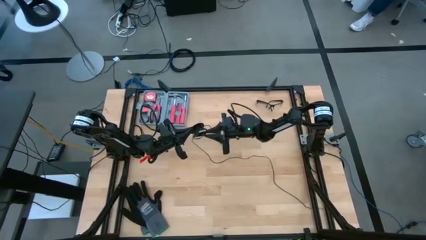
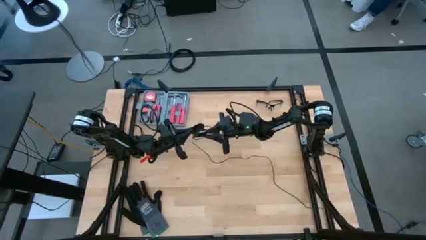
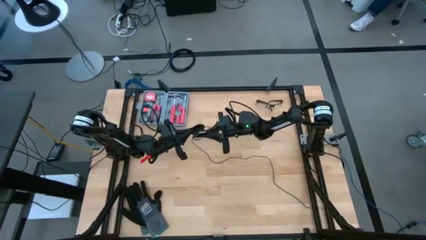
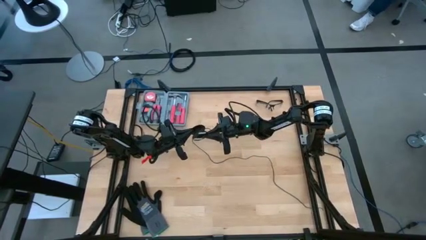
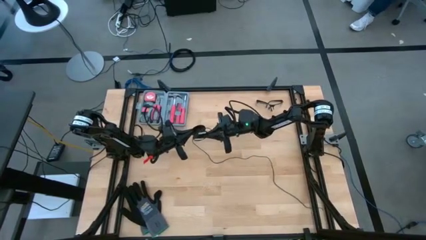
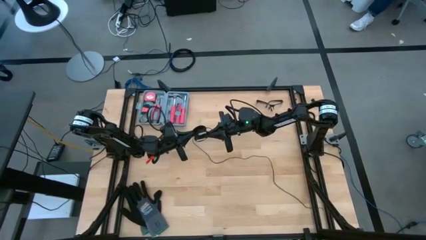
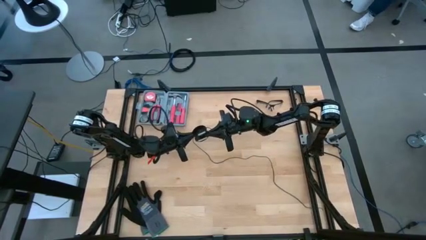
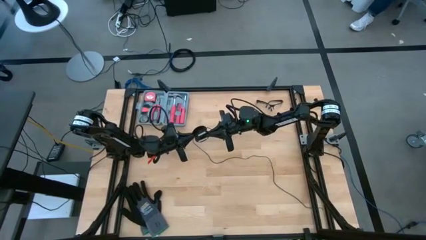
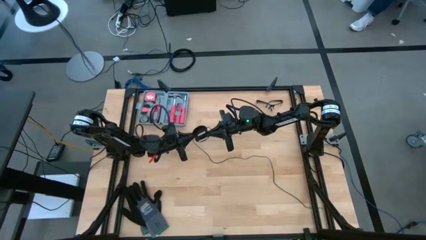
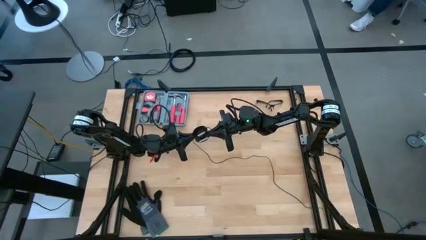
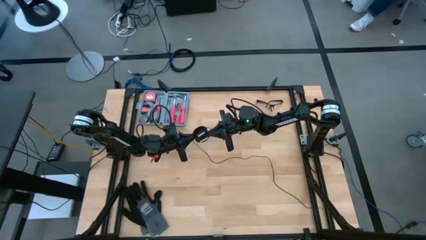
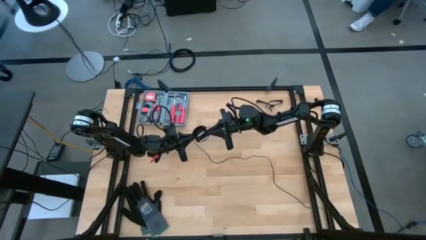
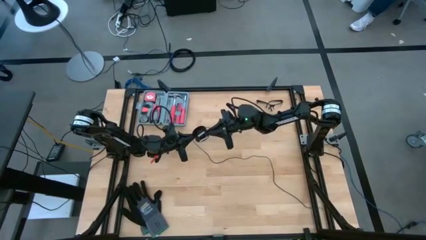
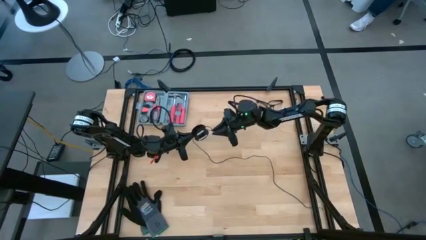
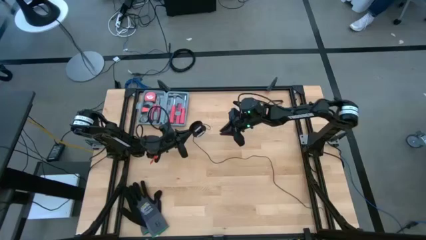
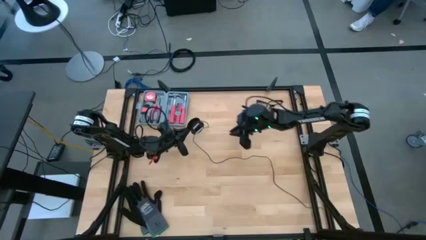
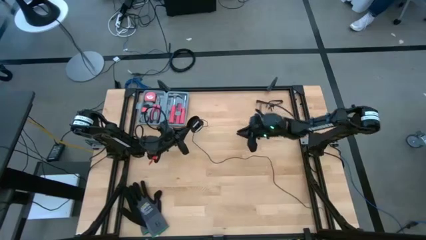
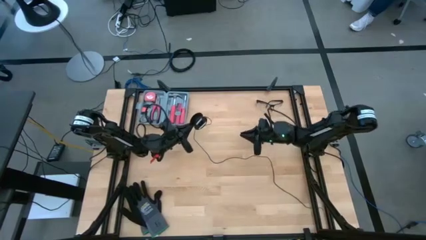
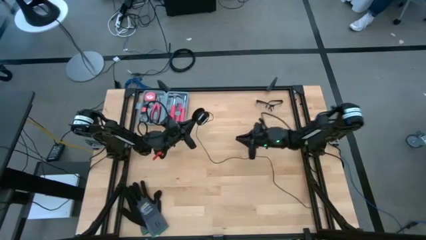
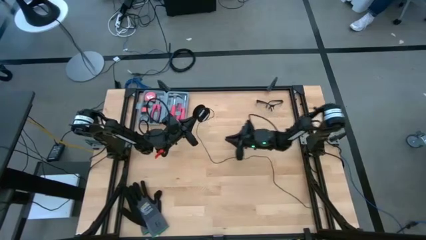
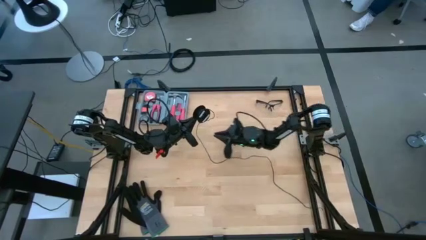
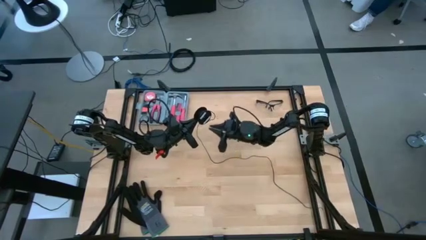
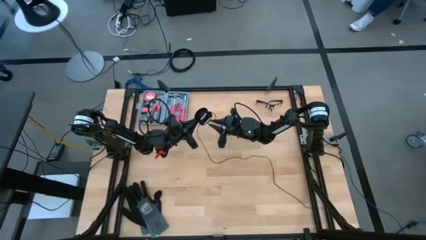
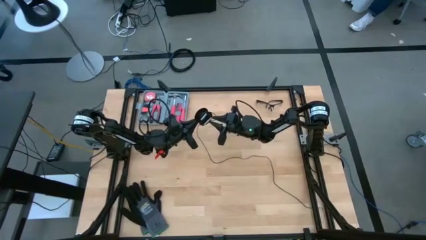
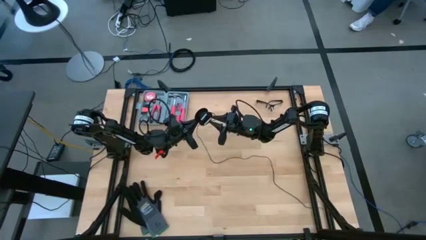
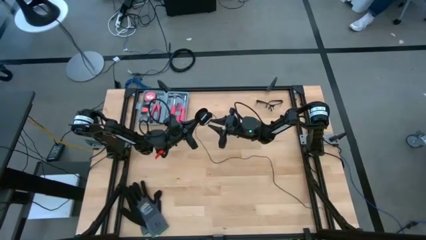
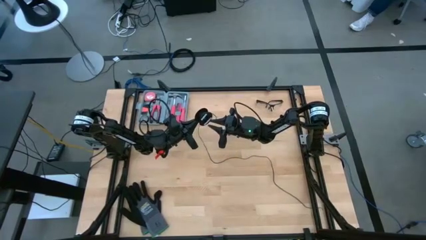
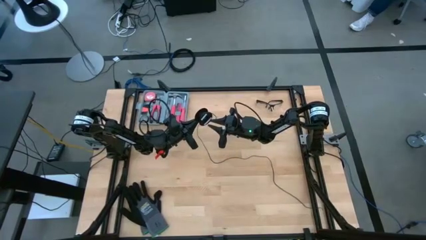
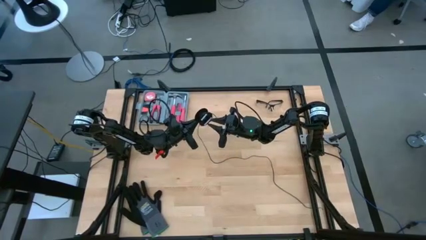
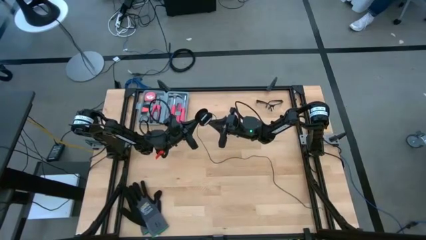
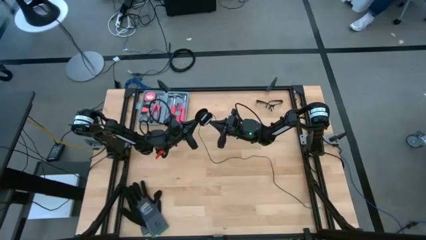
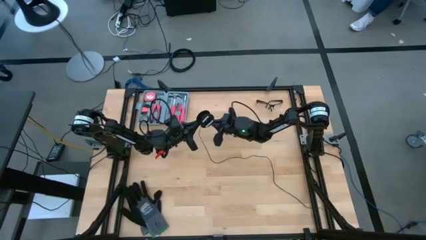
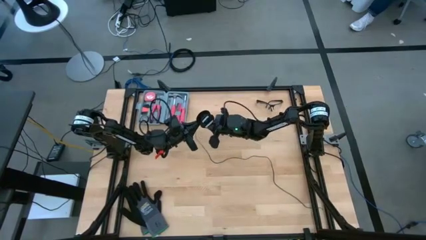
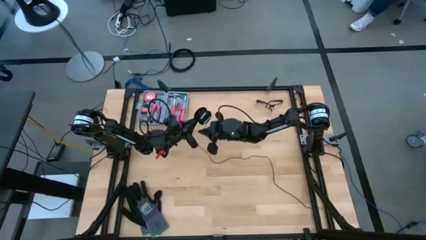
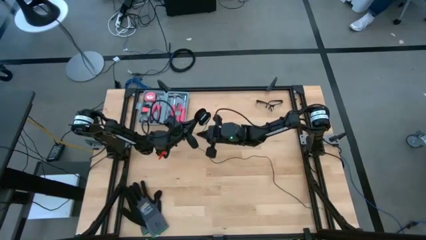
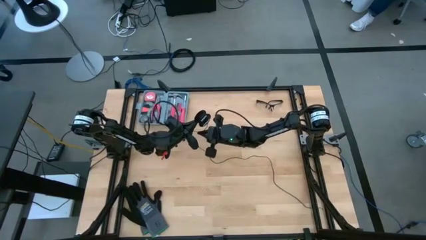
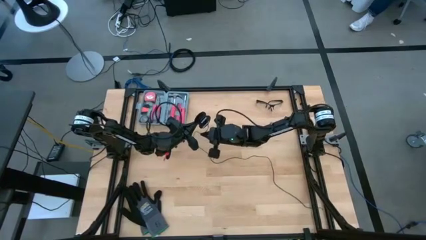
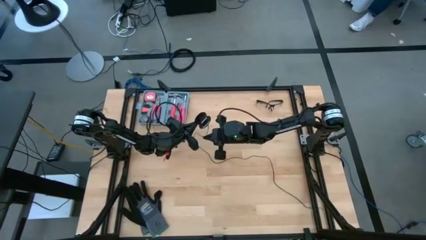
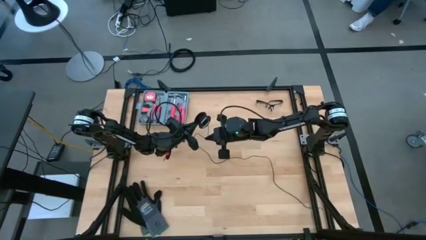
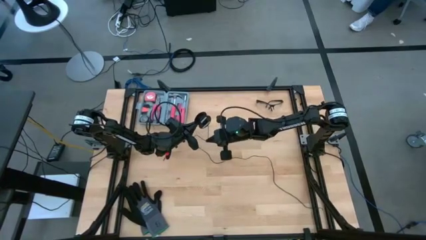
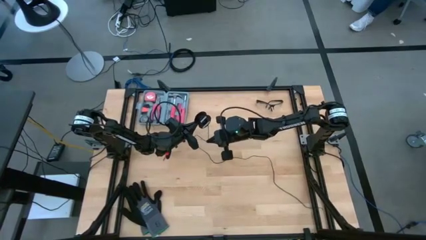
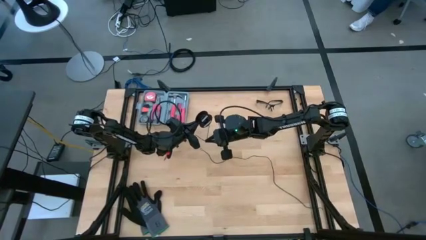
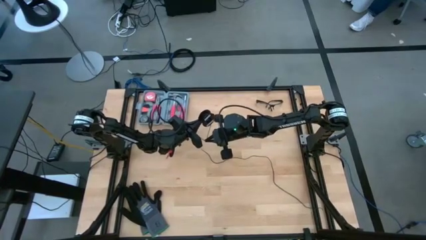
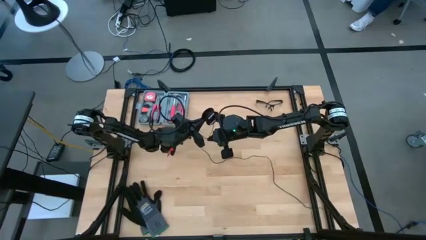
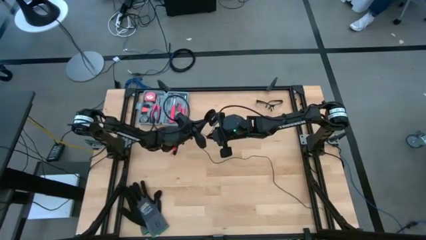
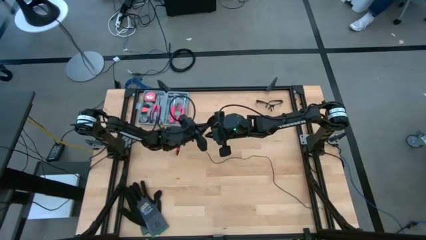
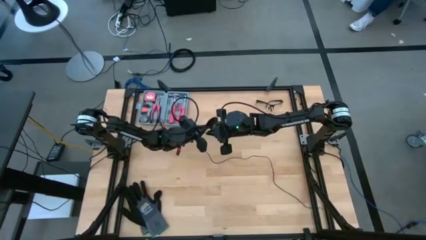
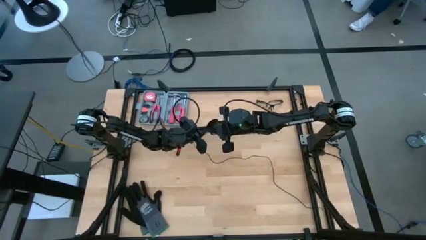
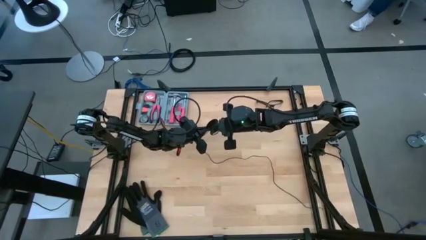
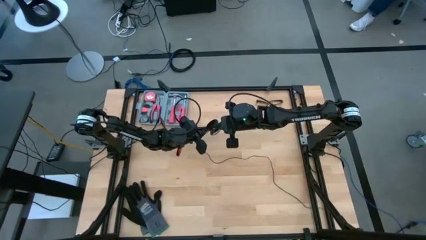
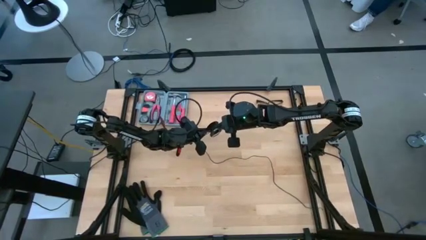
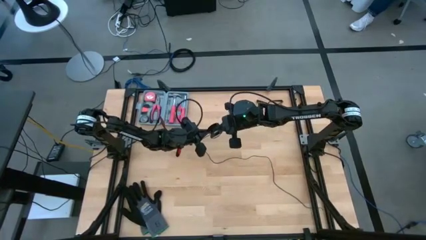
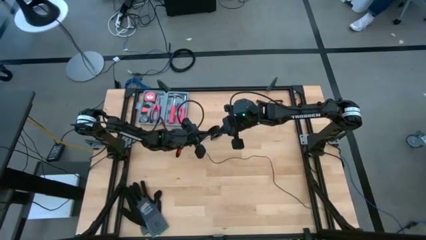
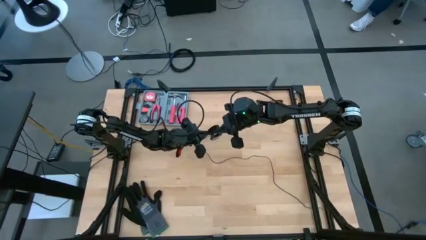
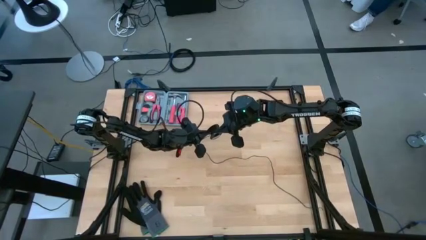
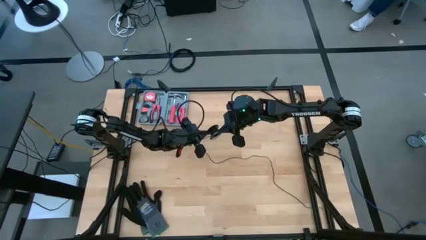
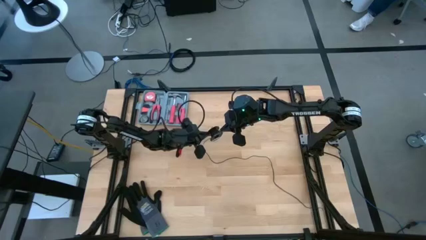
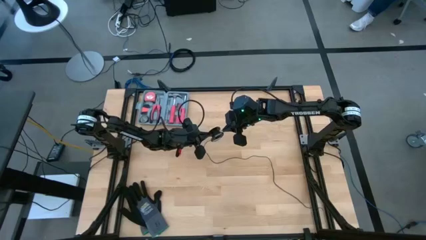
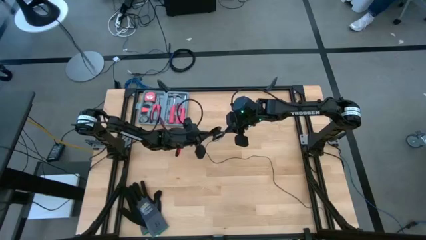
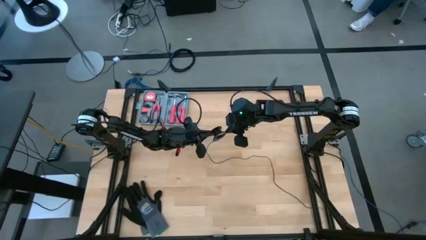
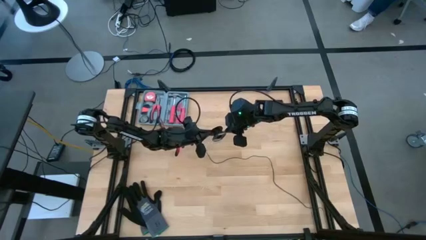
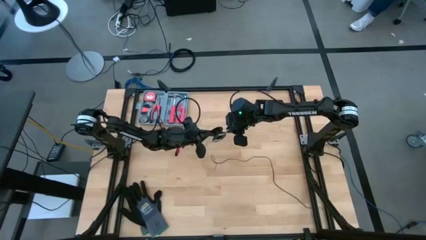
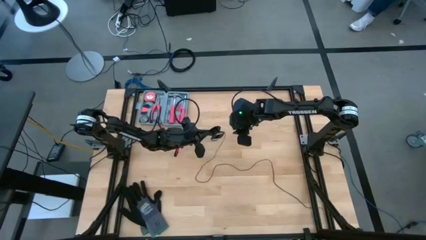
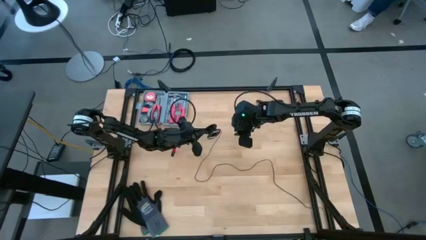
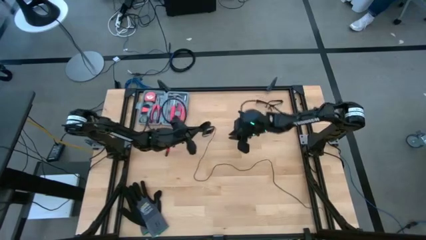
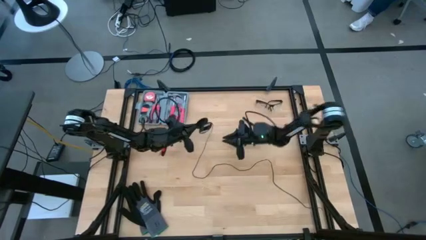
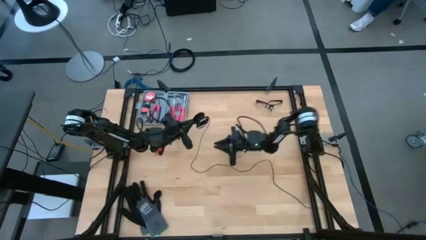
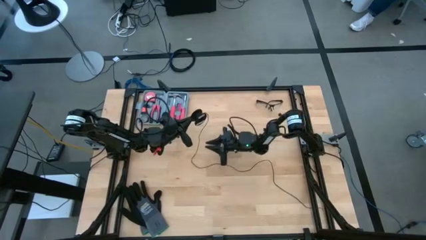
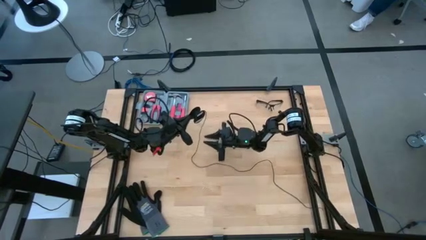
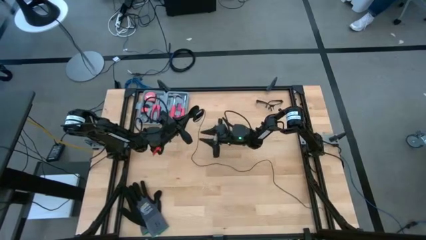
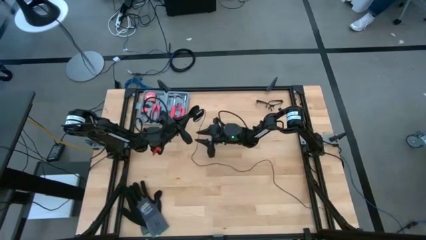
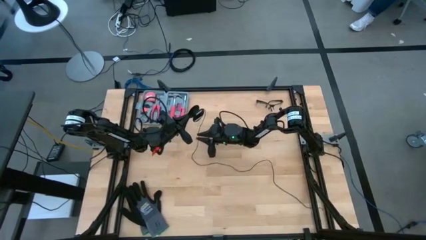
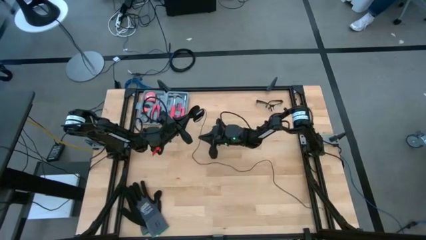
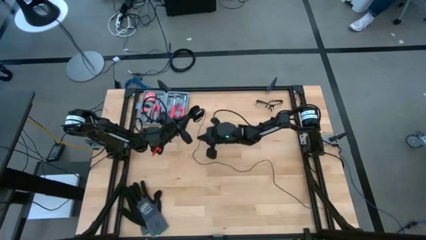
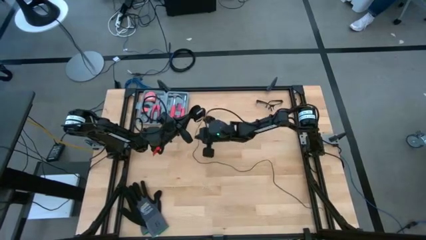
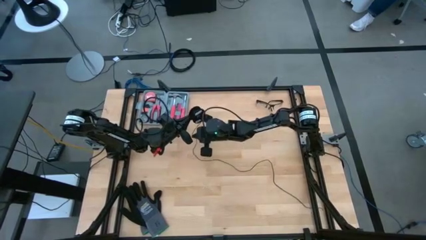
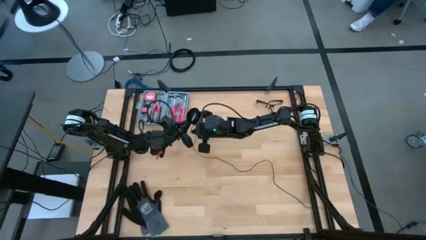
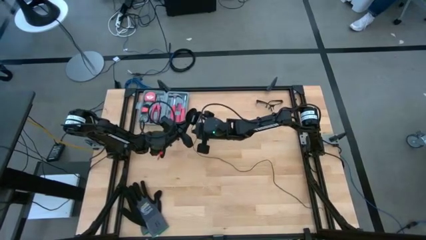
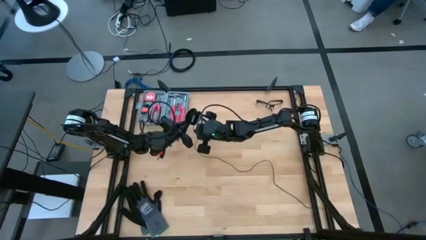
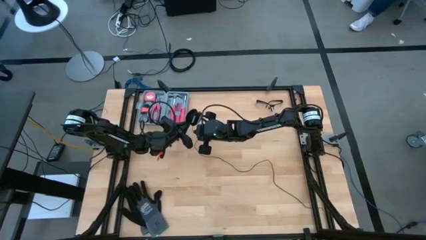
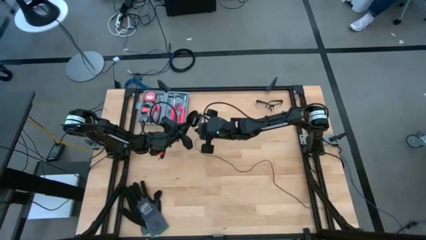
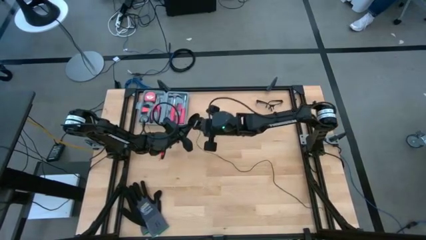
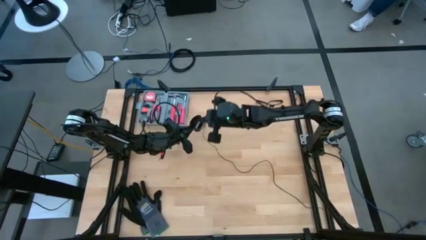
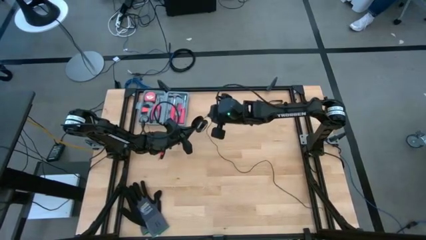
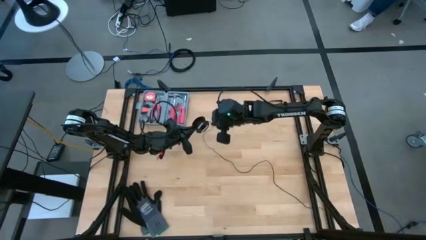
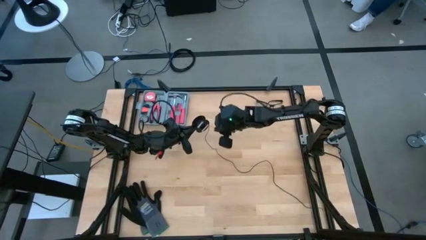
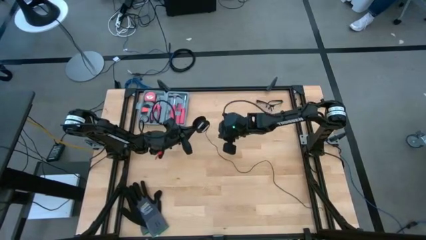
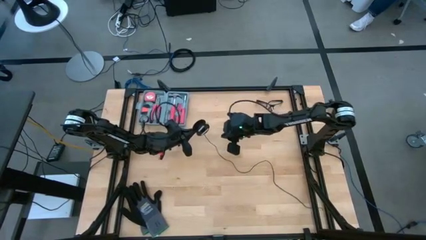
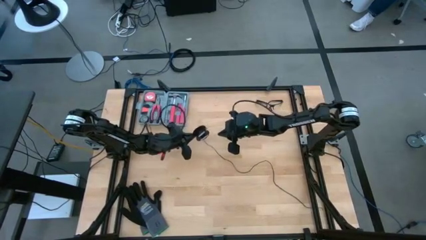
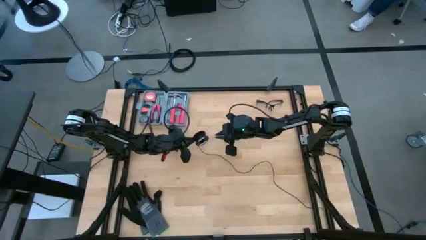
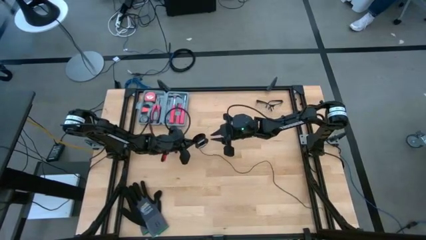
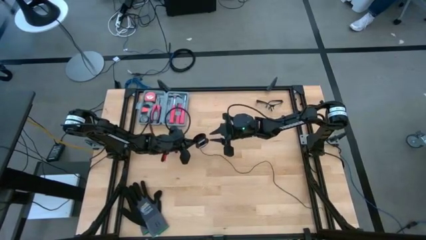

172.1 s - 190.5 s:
Task: Coil cords
Coil the black wire on the black spool
